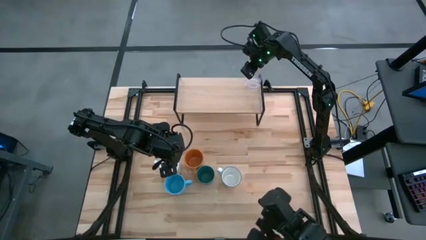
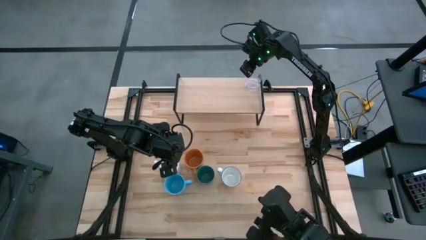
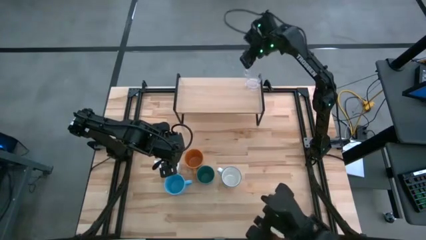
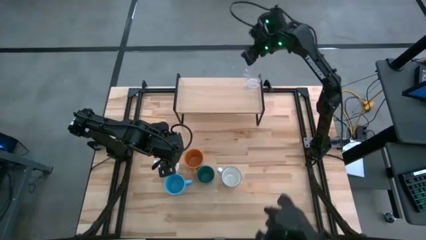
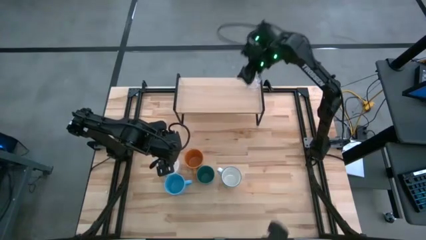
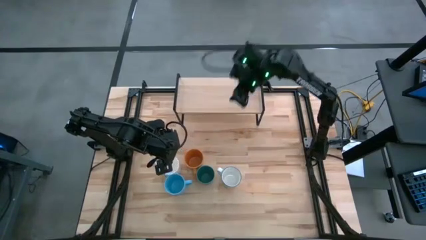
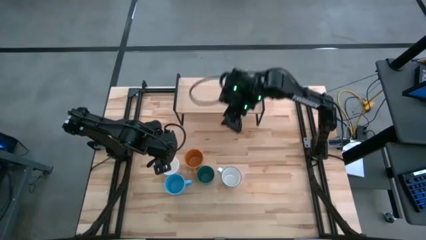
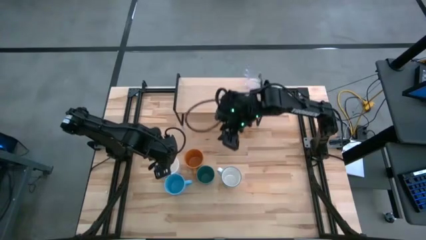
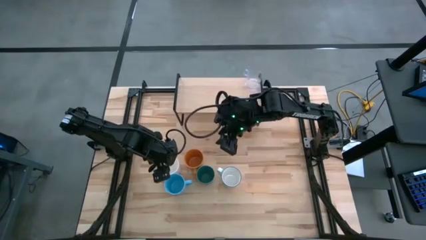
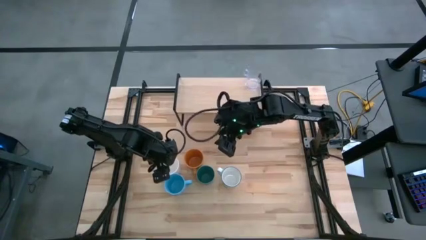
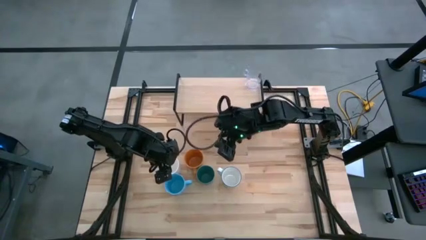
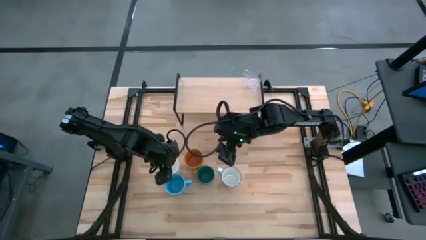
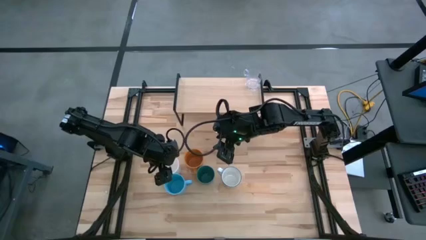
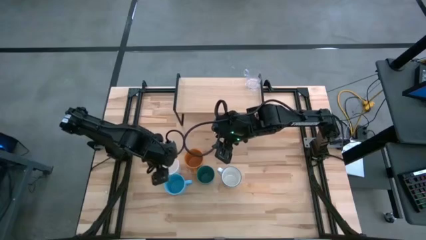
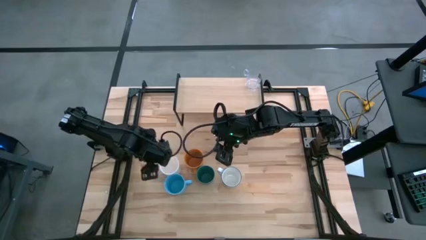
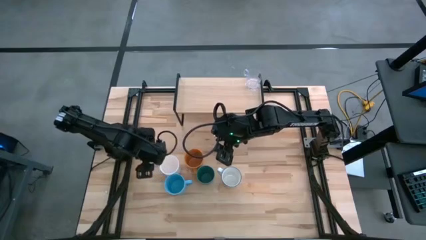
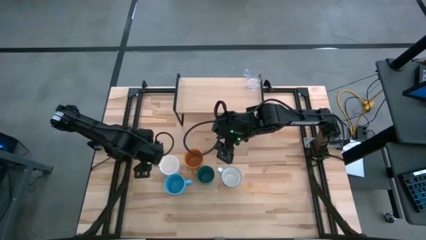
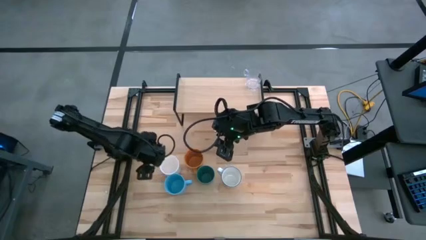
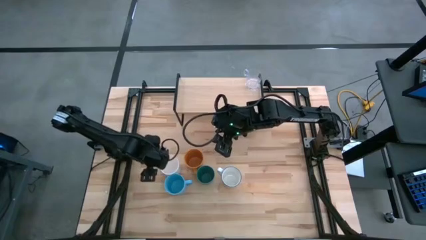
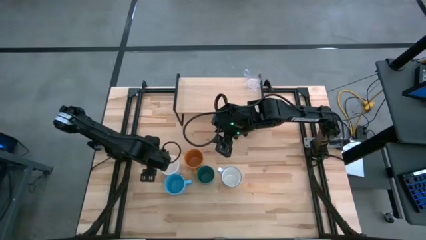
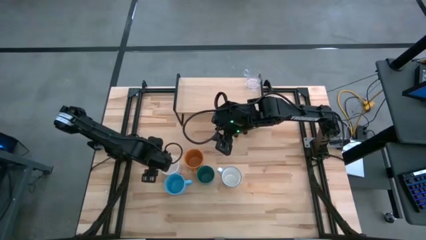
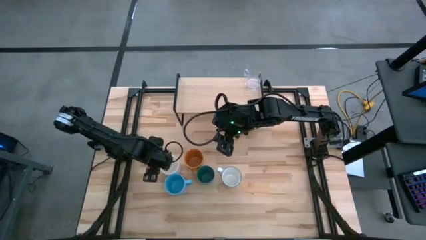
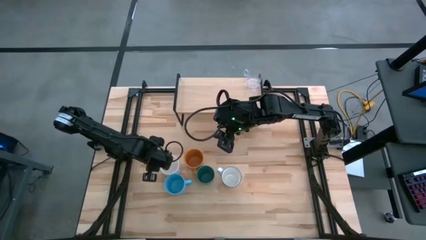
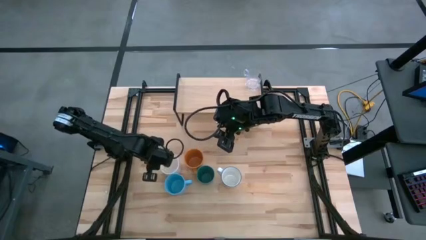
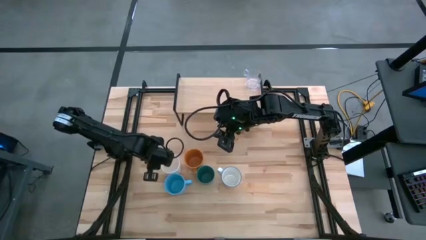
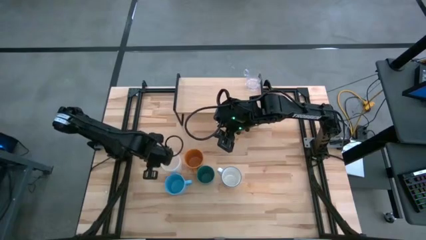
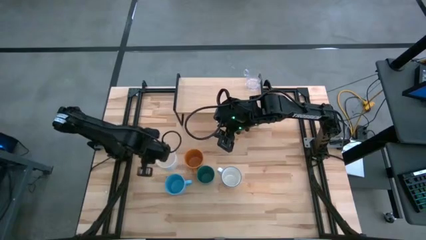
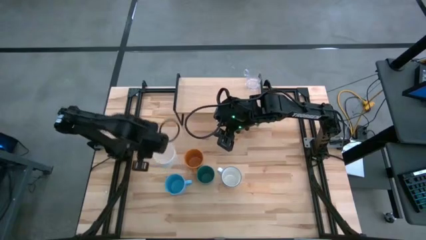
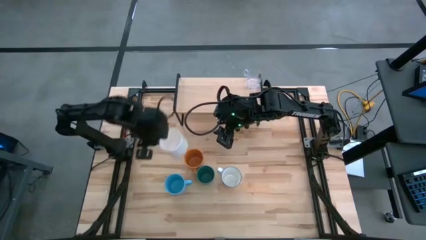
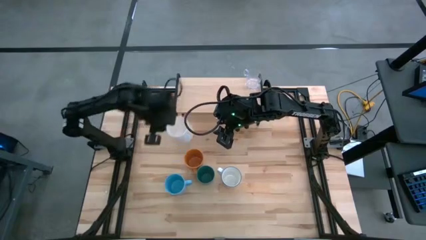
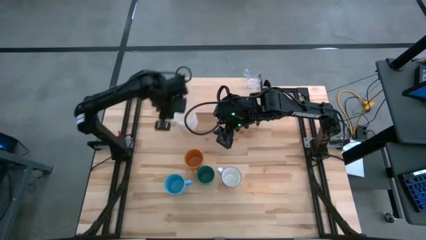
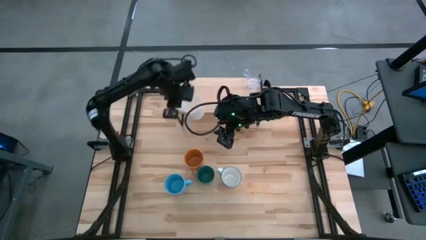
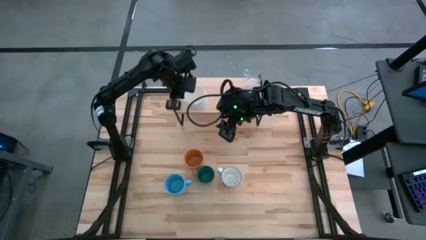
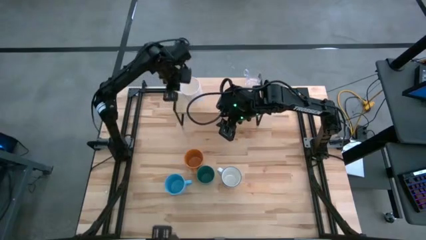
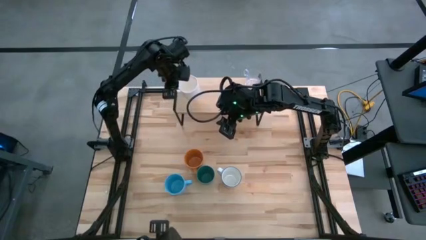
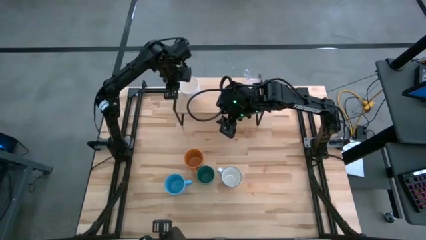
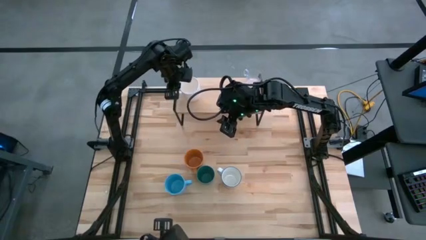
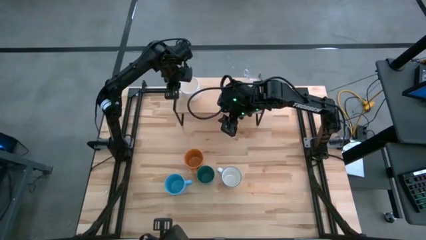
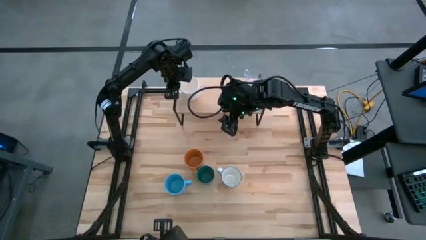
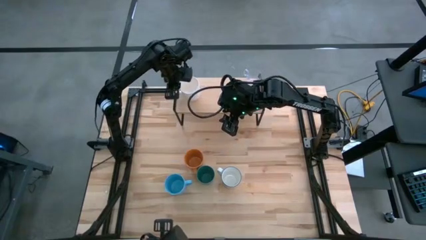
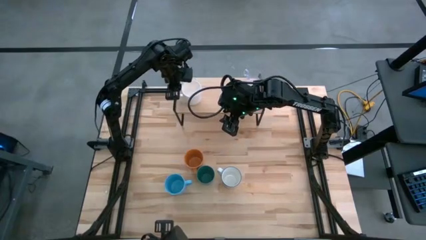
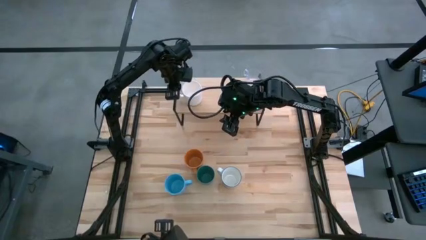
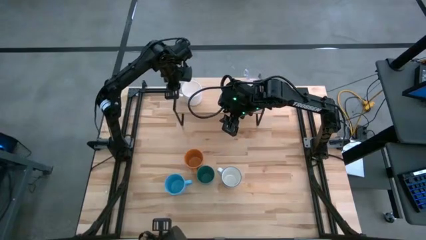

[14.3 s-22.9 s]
Task: Stack small to large cups/mugs on shelf
Put the white mug on the shelf

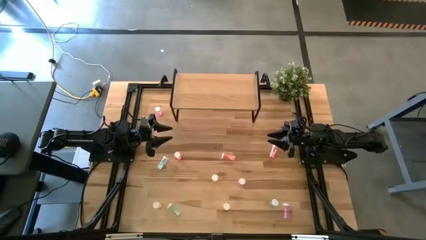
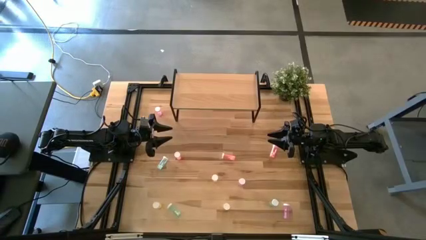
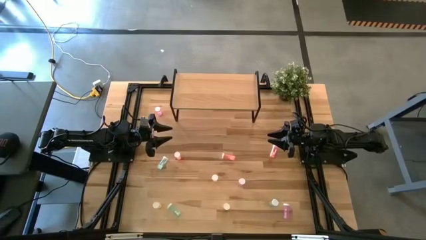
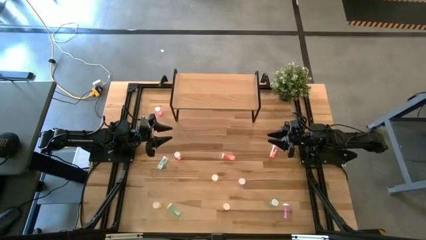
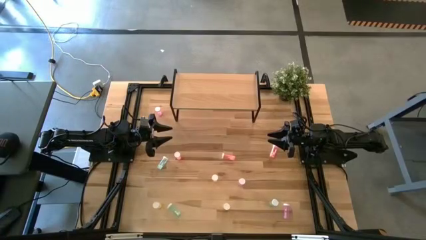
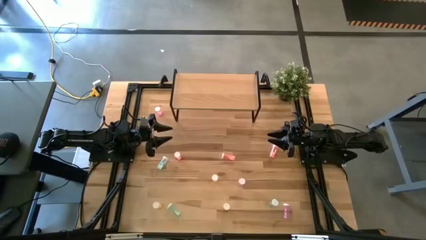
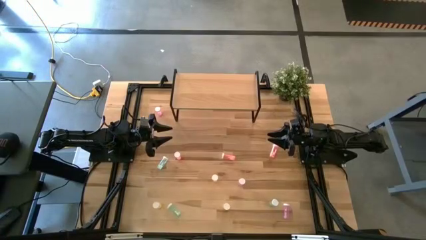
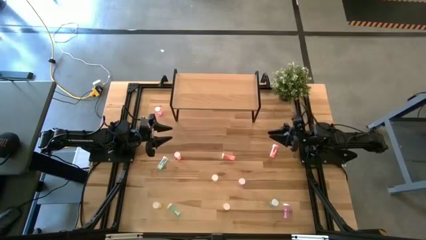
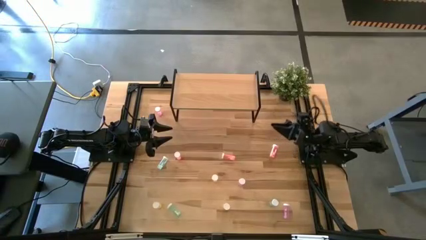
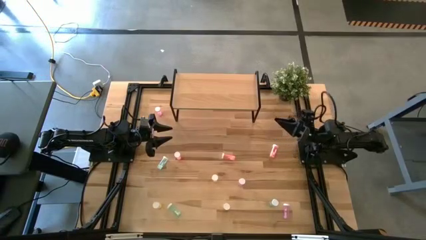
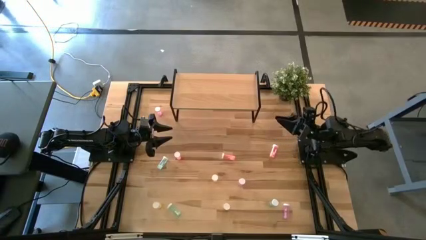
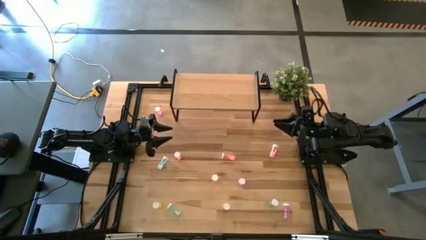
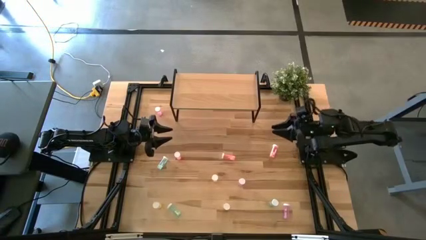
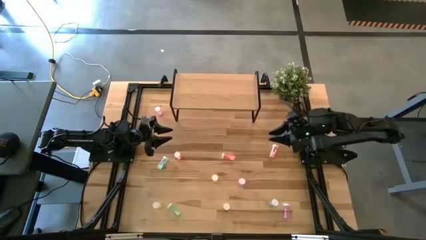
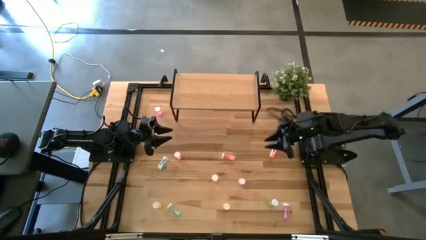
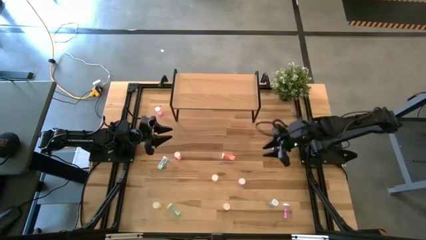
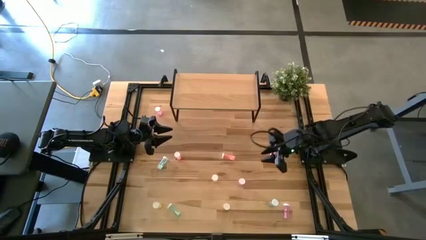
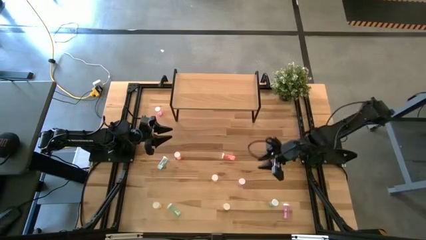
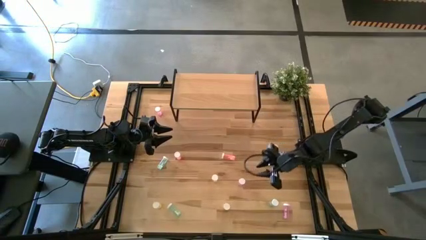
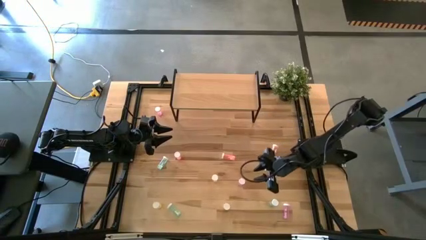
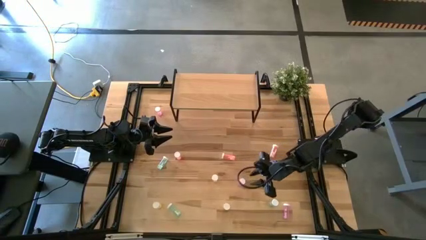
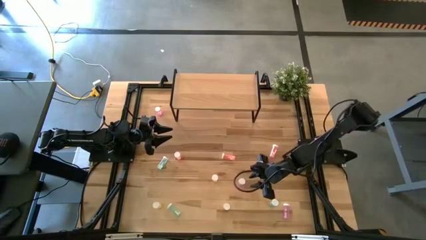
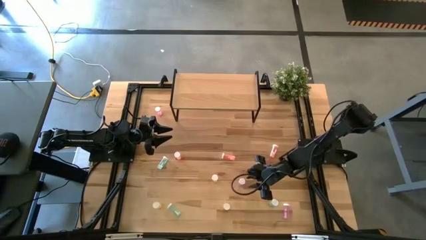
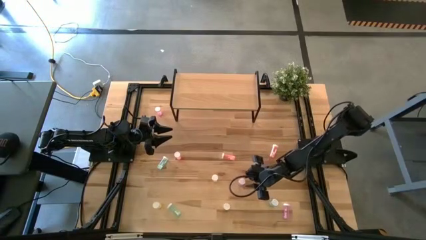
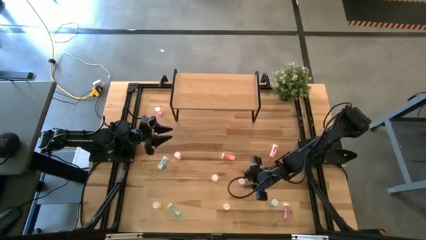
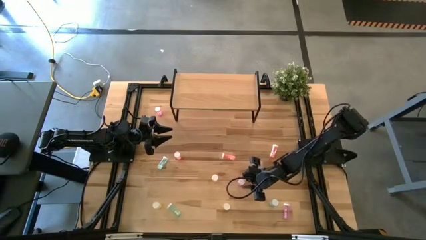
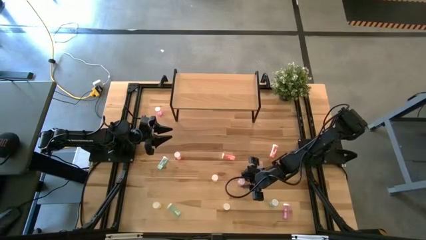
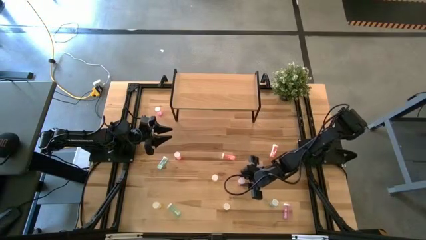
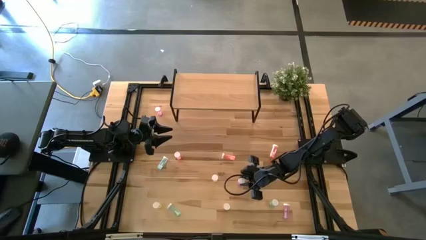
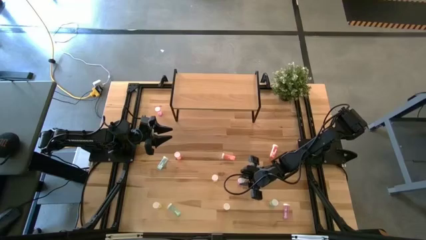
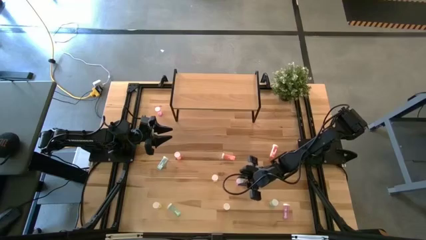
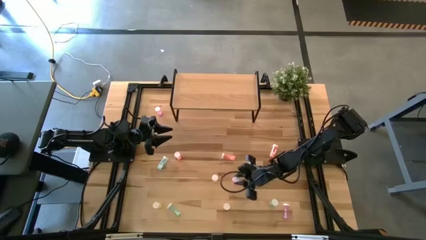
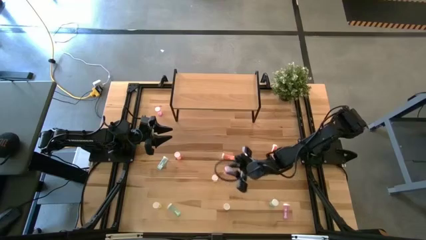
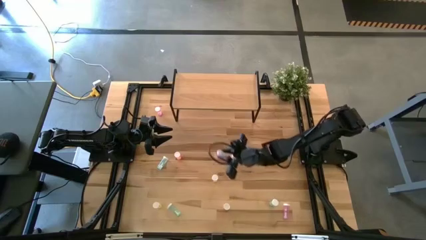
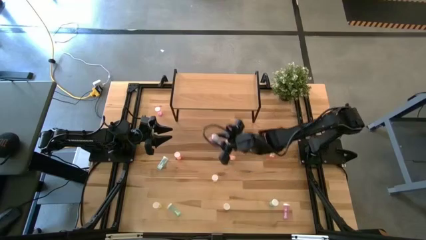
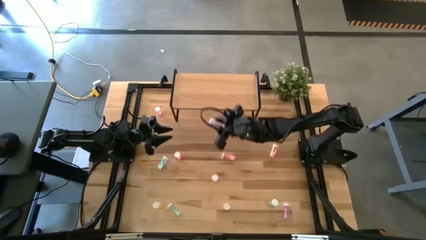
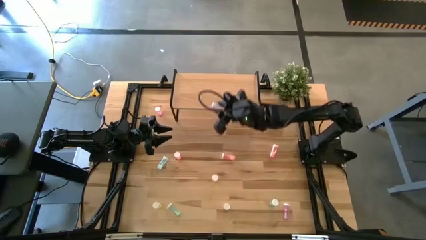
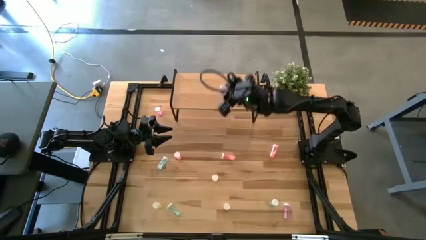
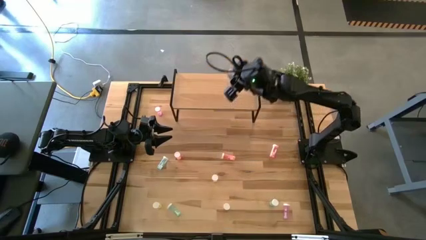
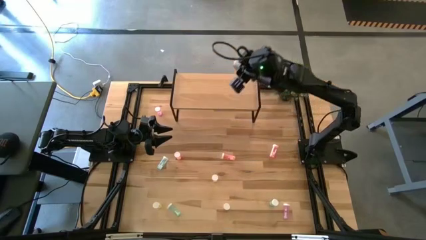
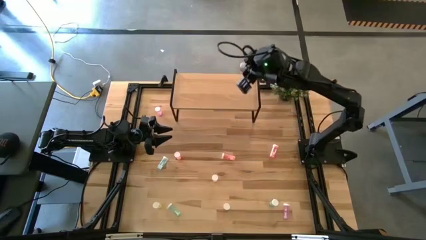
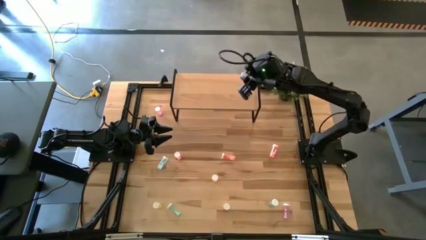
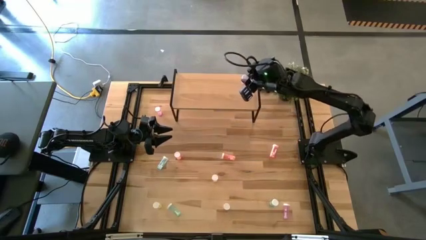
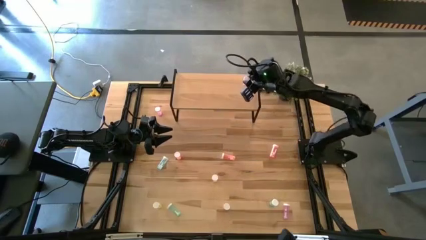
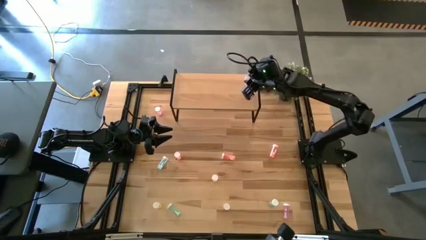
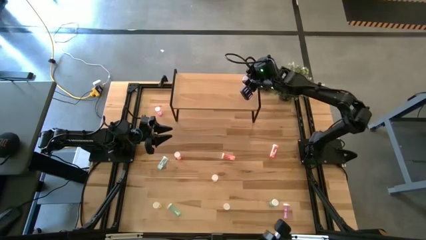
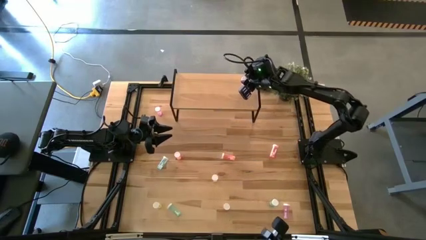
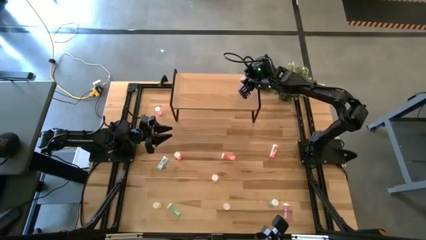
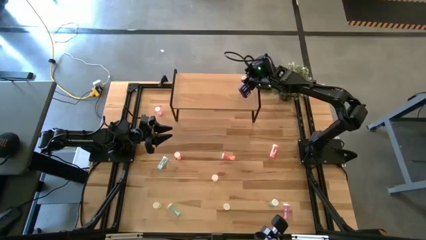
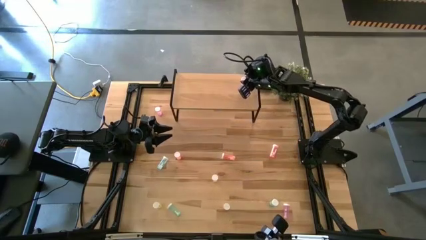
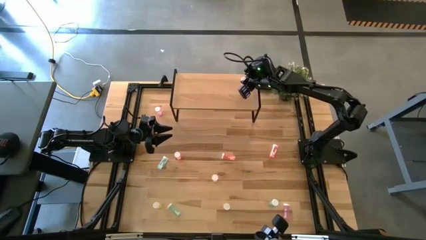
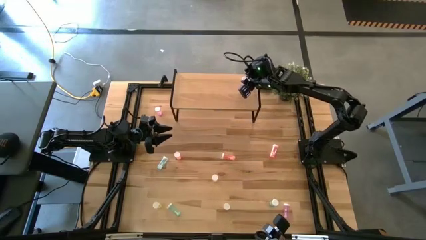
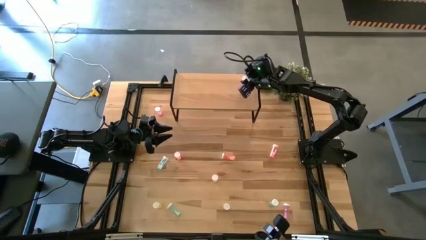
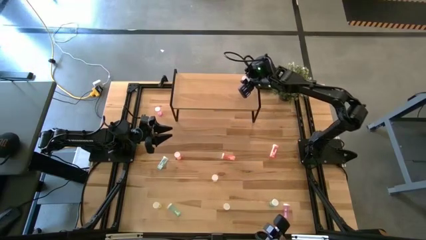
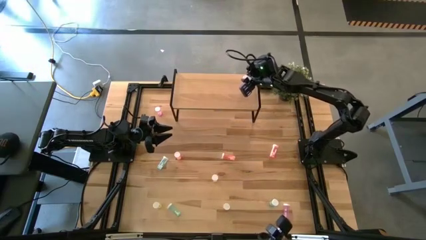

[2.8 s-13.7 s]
Task: Pick and place medicine bottles onto shelf by color
Put the middle purple pill bottle on the shelf
